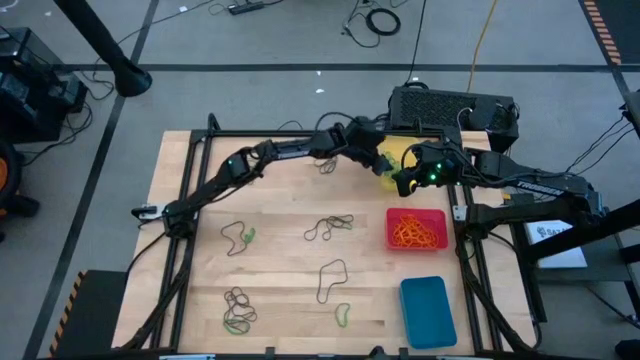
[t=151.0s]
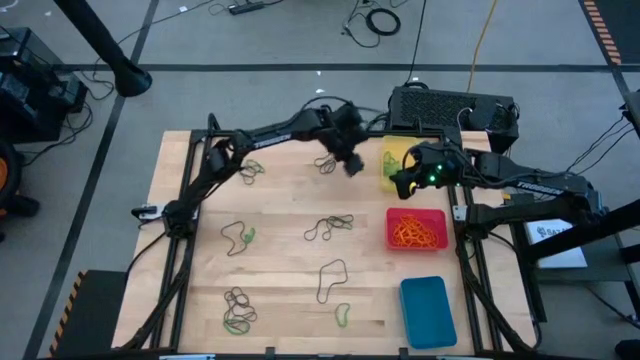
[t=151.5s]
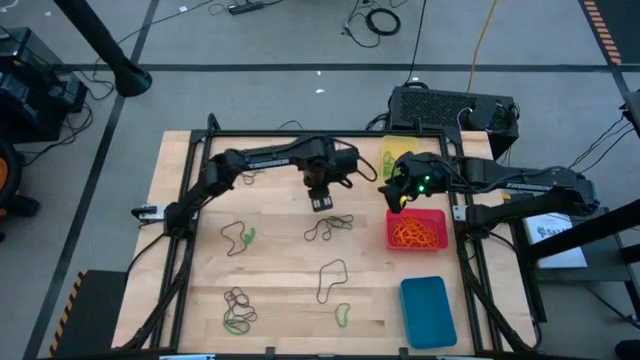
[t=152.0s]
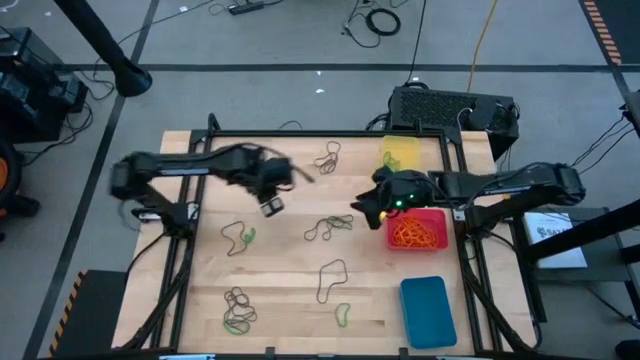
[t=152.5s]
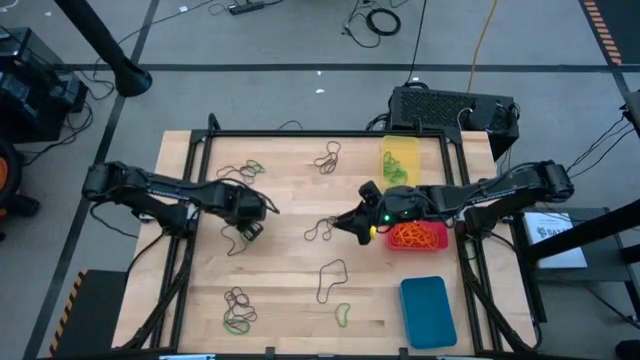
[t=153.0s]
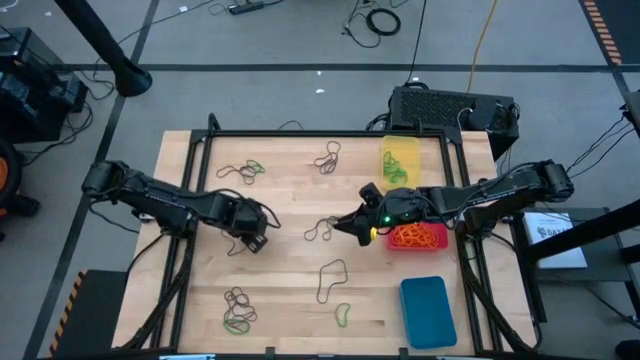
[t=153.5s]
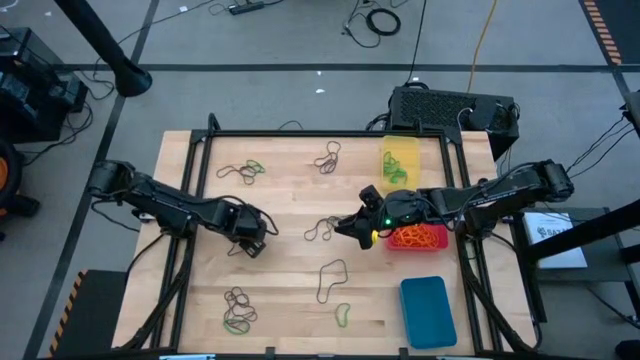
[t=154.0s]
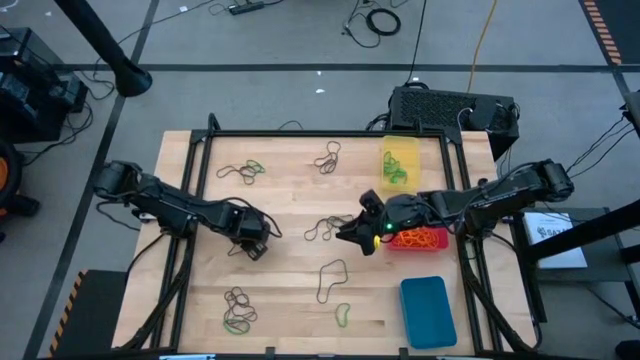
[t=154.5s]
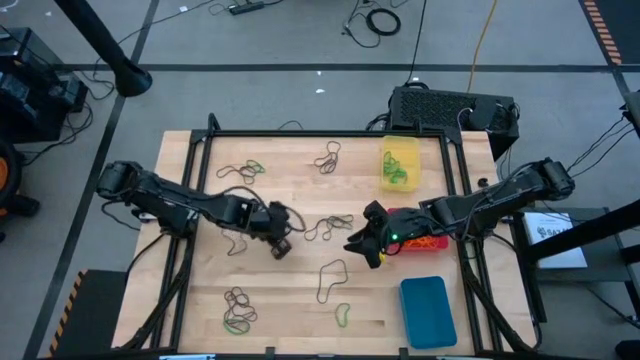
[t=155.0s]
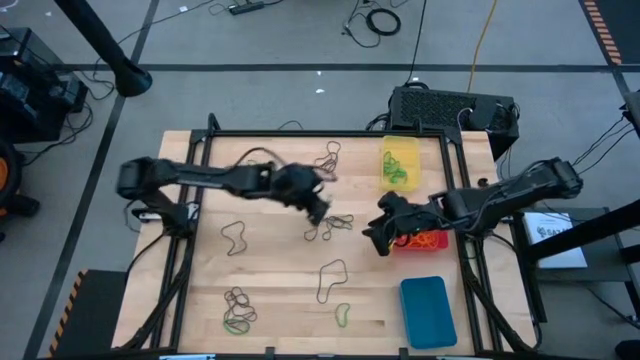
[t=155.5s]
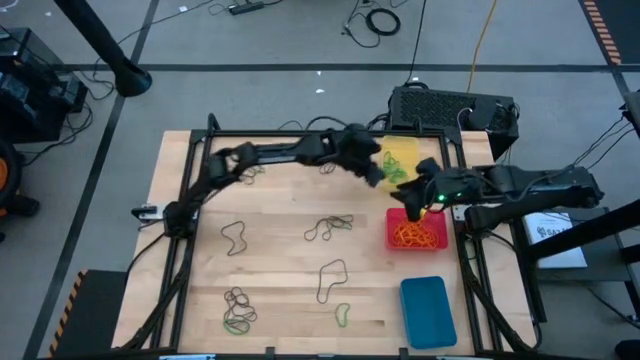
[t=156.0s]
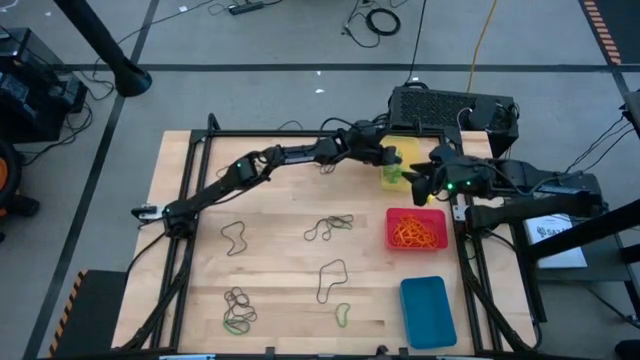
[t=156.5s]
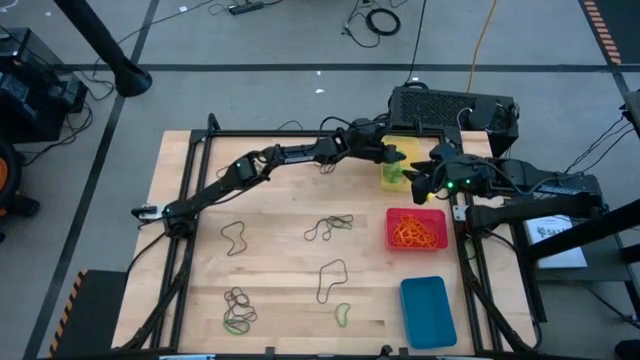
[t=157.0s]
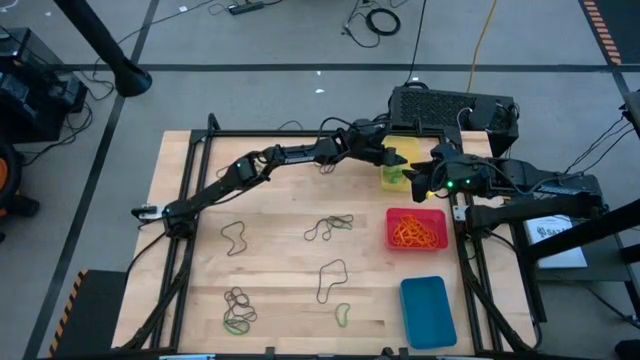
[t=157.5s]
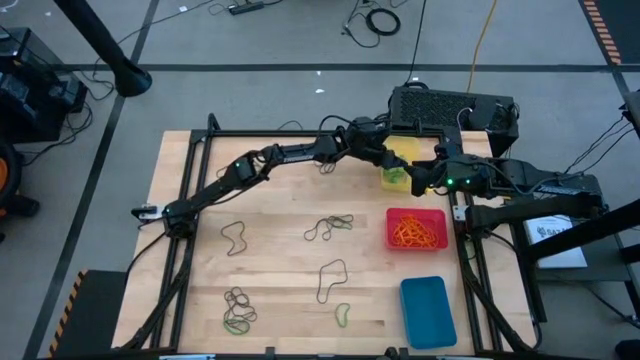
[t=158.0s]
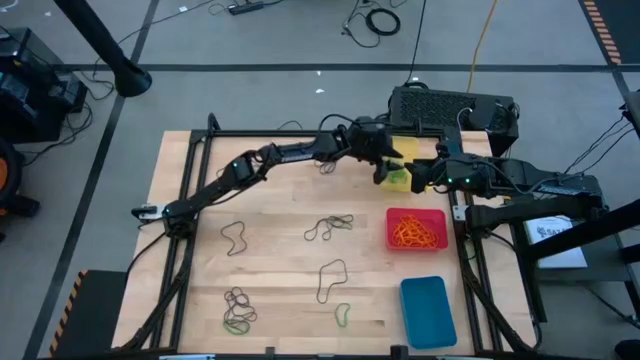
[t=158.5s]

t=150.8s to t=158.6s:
Task: Sort rubber bands into baskets
Put the green rubber band into the yellow bin

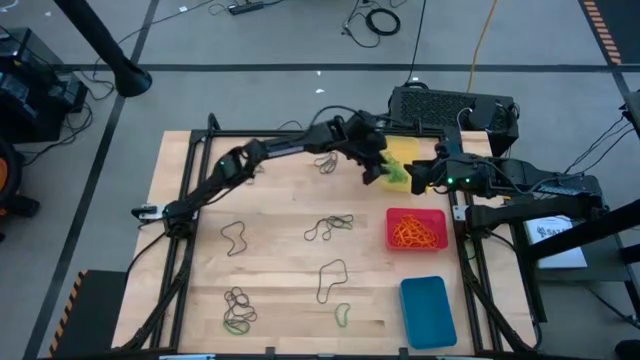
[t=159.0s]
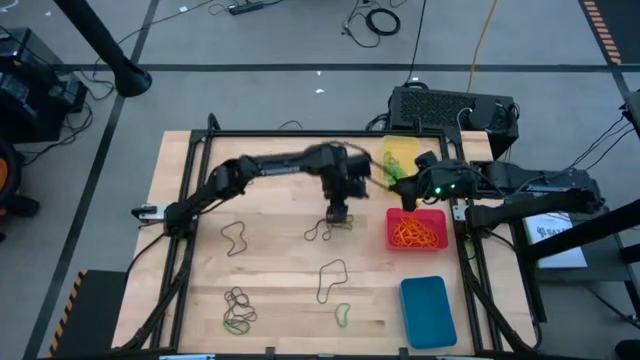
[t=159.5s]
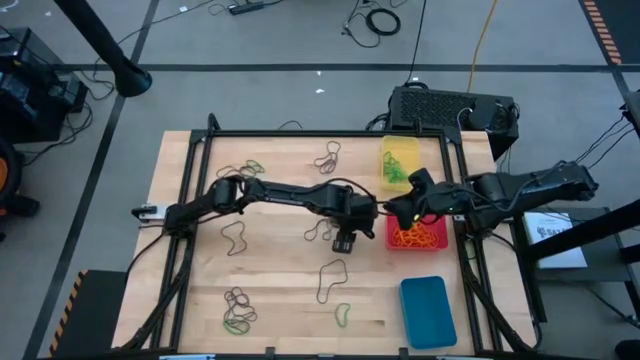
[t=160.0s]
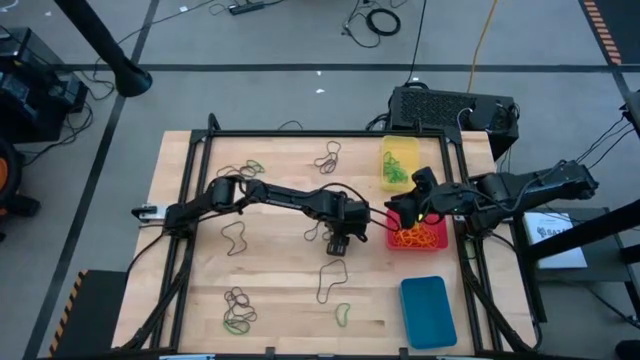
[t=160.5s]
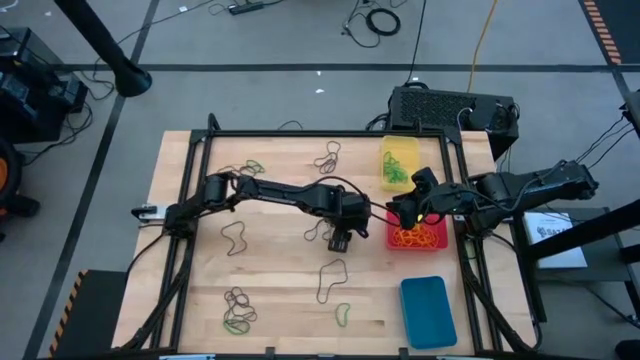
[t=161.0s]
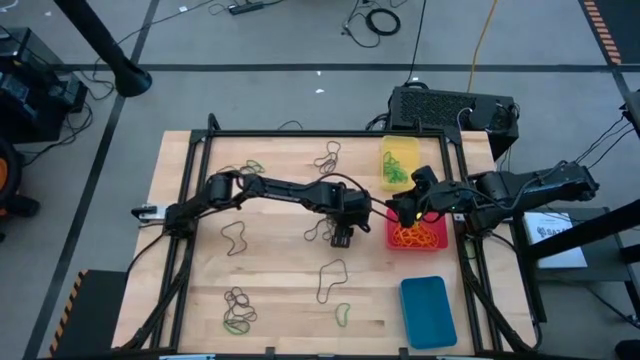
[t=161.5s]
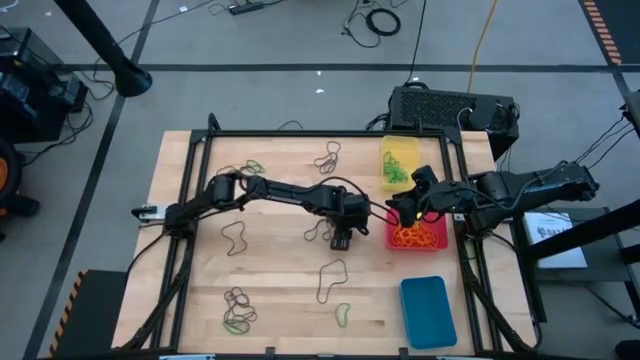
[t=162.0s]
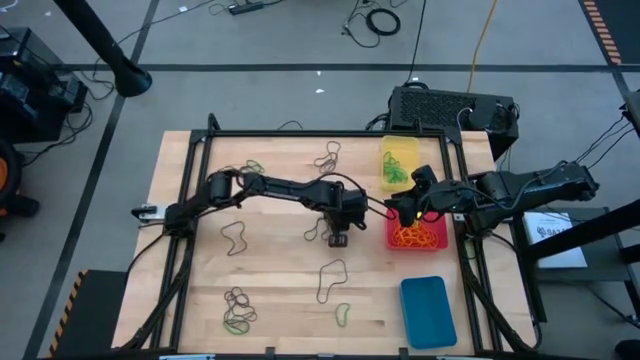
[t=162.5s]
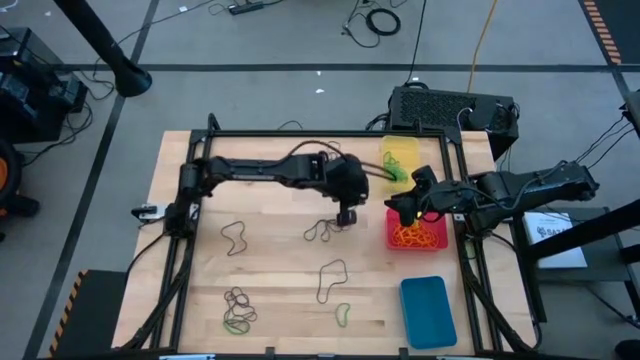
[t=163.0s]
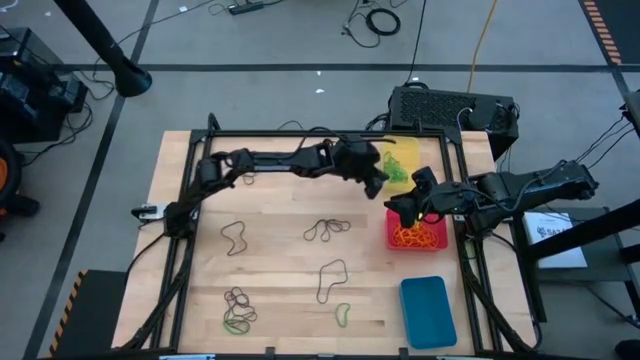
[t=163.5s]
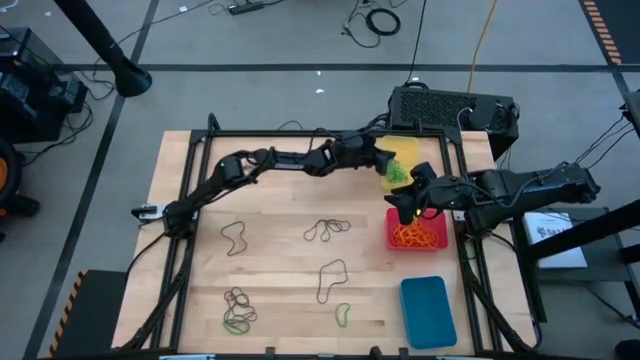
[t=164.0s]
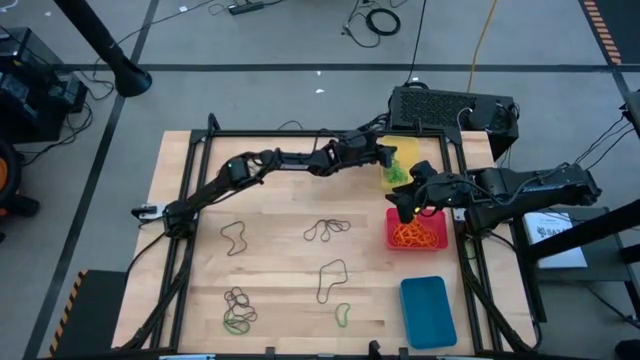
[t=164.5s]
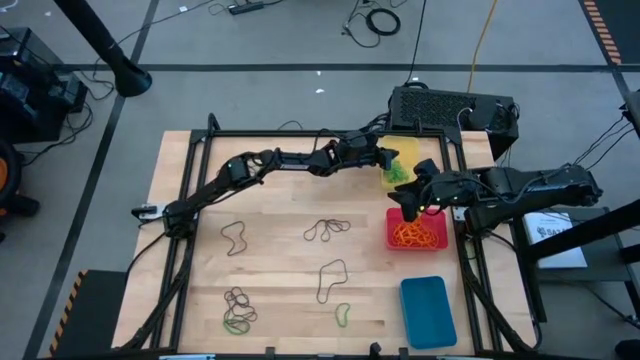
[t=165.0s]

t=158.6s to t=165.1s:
Put the green rubber band into the yellow bin

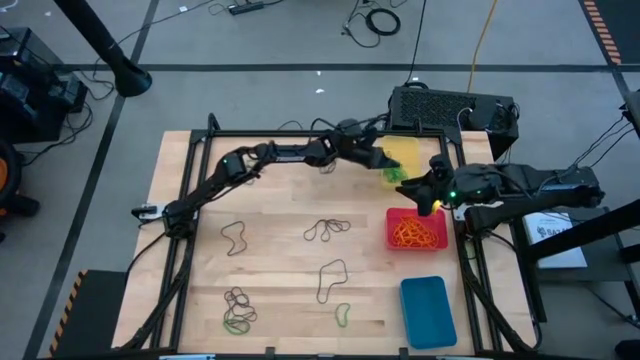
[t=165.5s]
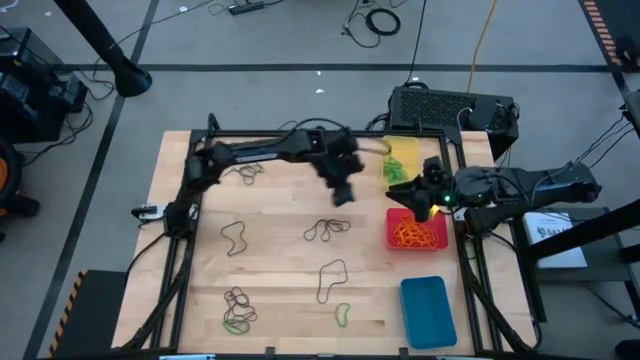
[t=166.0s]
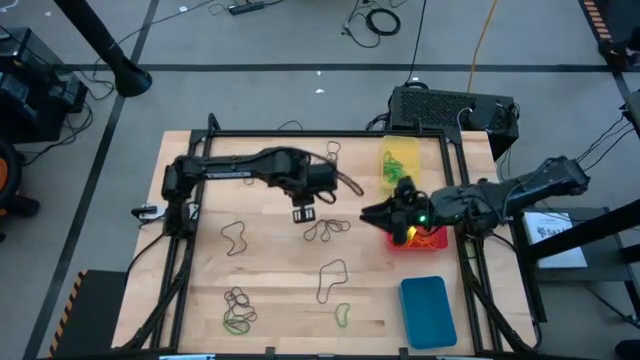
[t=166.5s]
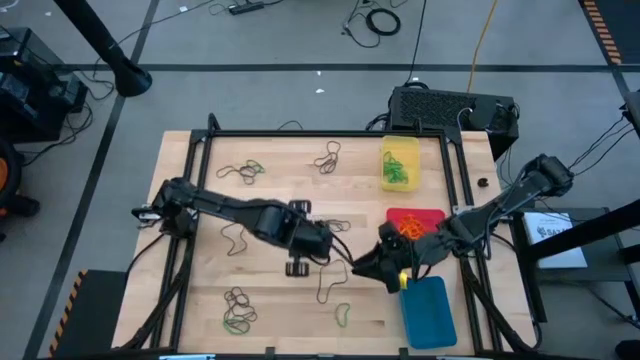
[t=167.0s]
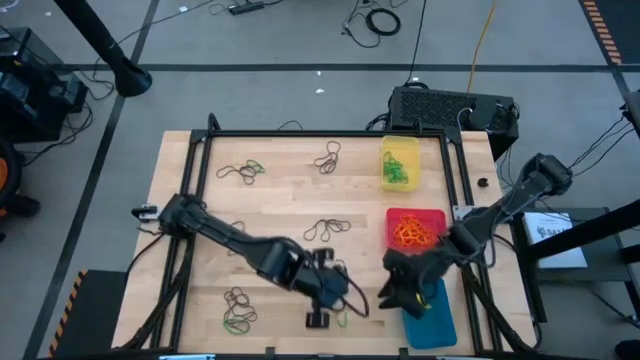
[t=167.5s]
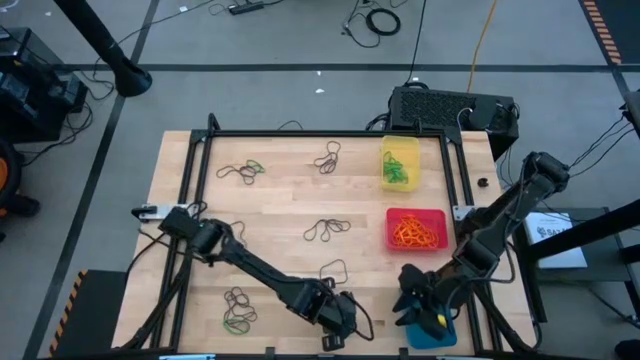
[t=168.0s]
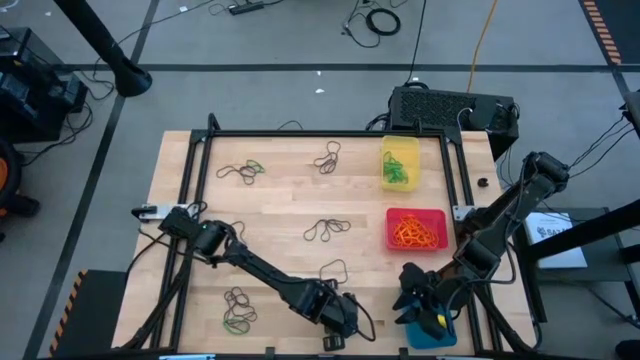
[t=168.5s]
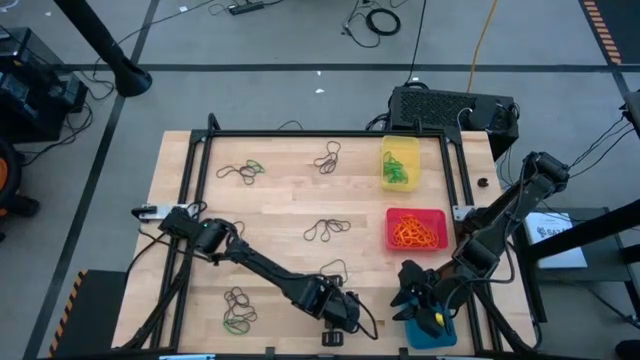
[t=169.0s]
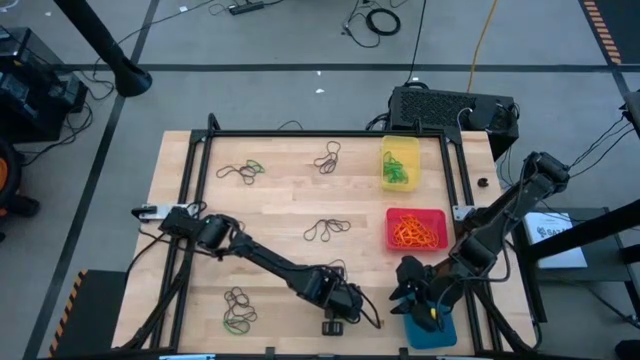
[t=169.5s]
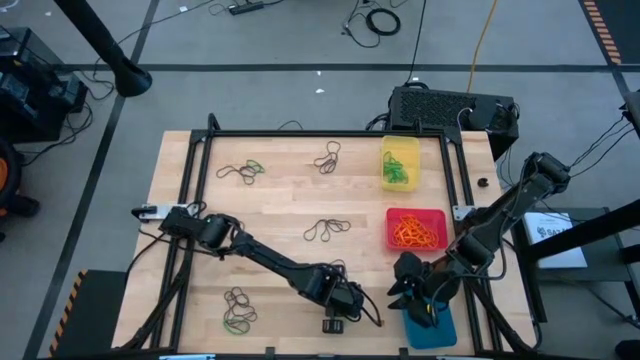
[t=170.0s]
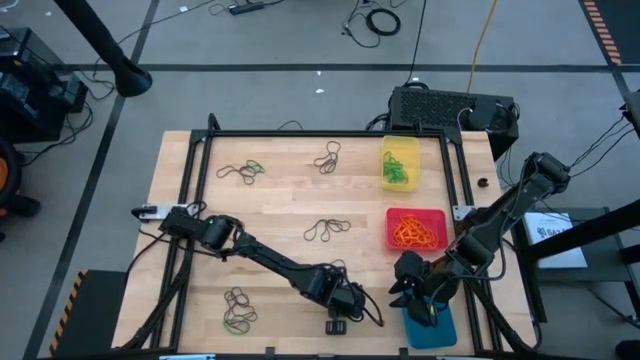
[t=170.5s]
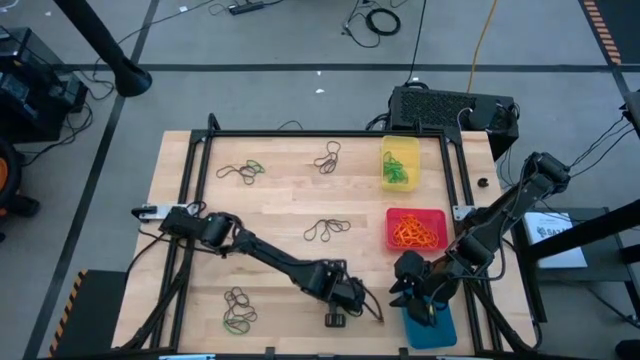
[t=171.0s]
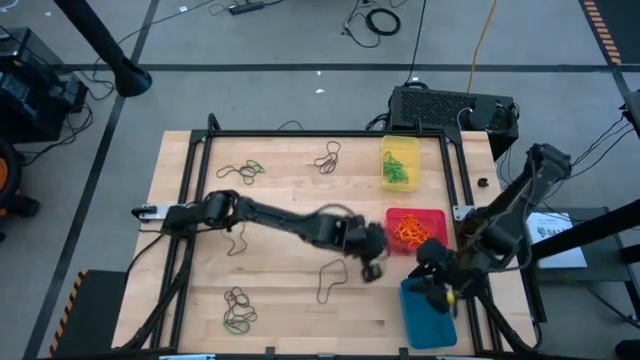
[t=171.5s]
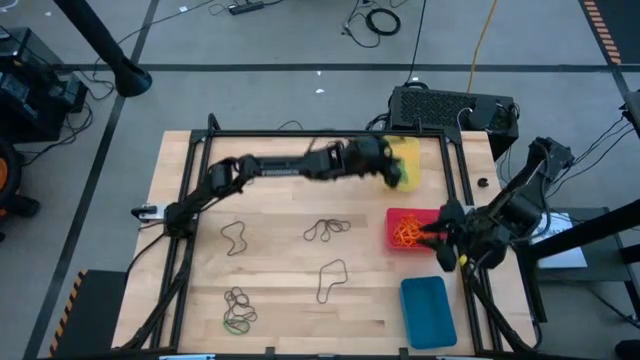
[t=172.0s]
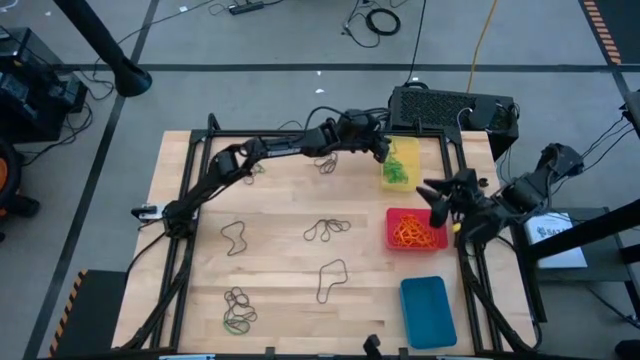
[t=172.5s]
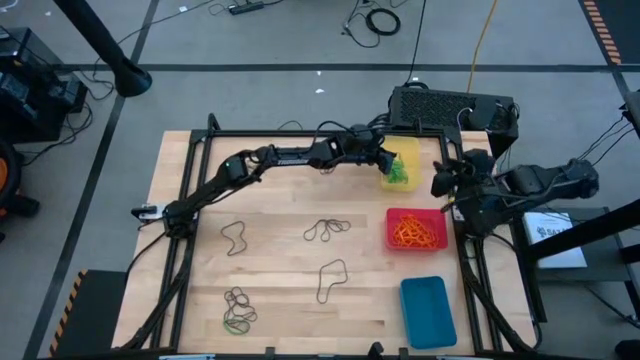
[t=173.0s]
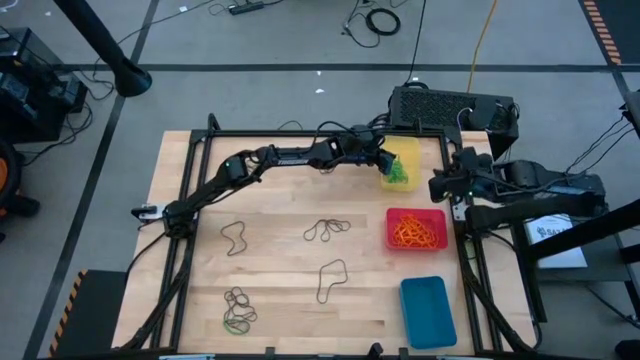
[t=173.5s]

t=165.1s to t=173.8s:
Put the green rubber band into the yellow bin
